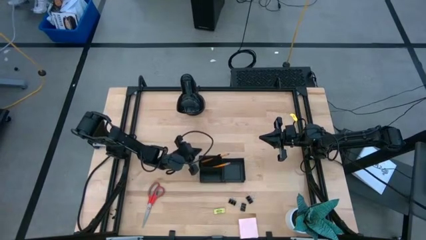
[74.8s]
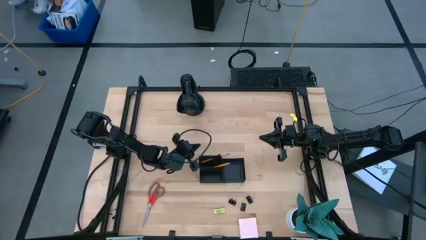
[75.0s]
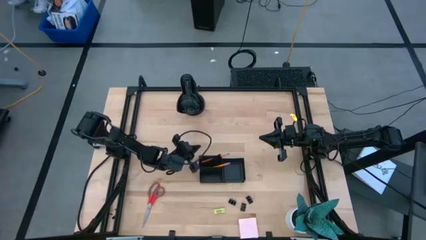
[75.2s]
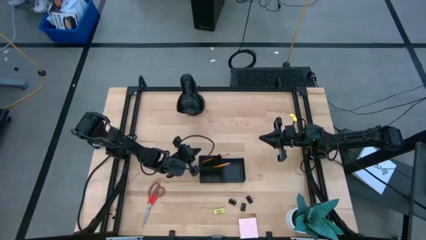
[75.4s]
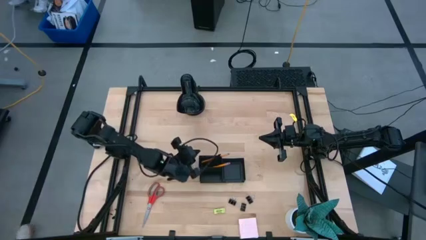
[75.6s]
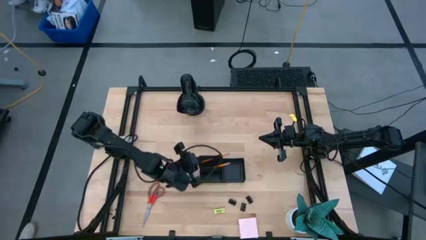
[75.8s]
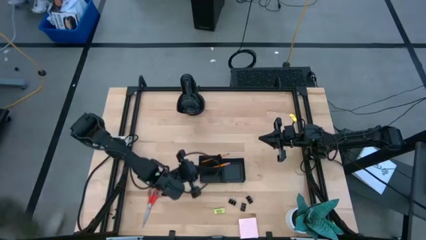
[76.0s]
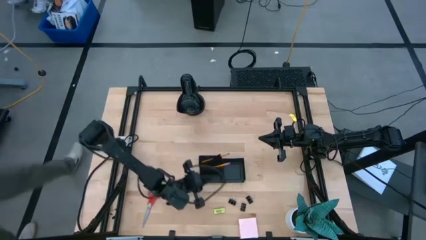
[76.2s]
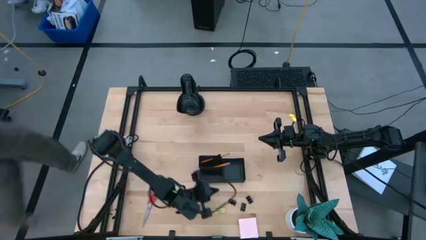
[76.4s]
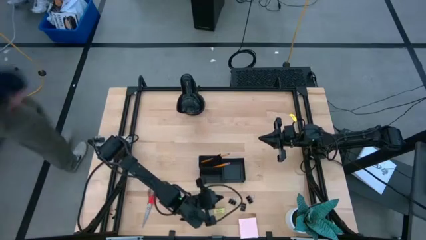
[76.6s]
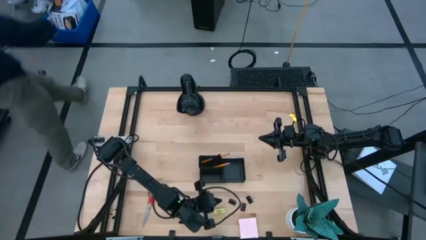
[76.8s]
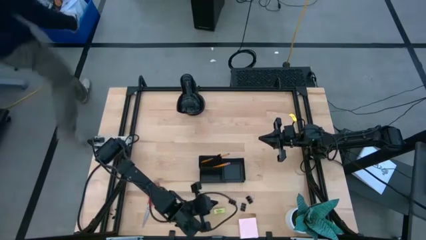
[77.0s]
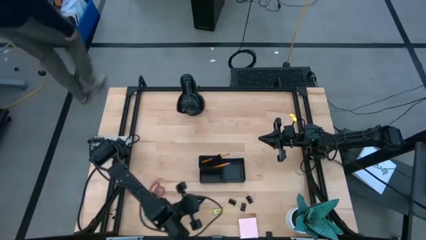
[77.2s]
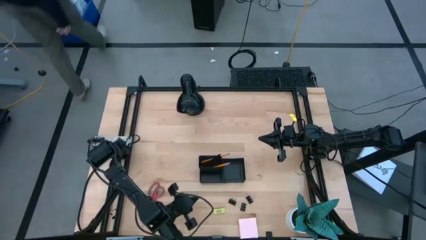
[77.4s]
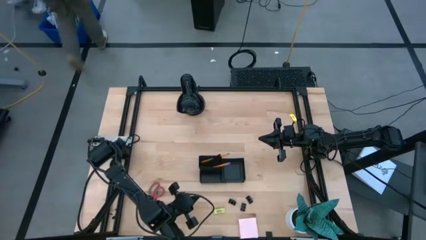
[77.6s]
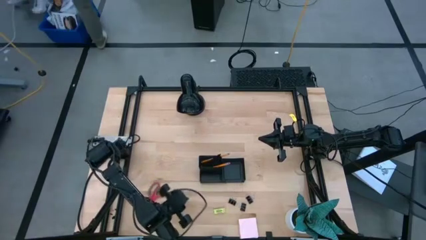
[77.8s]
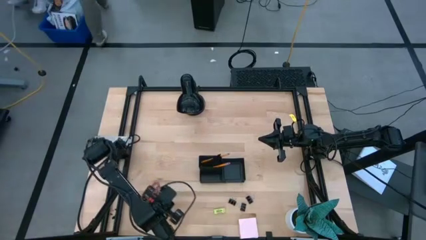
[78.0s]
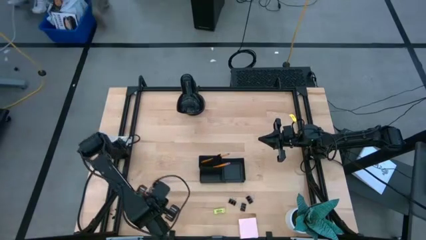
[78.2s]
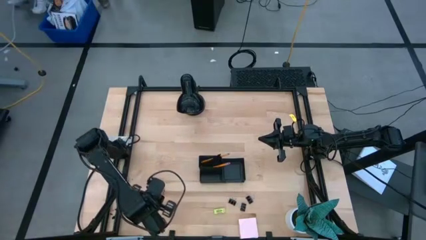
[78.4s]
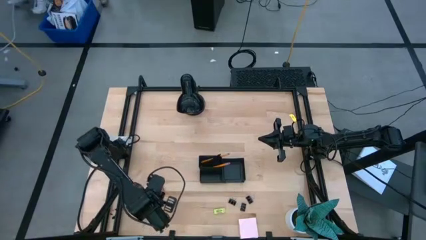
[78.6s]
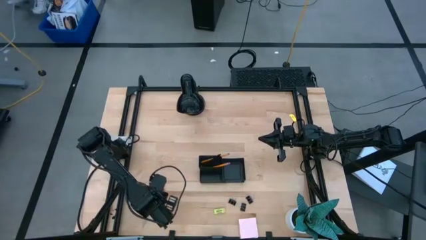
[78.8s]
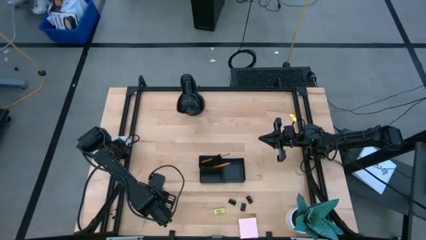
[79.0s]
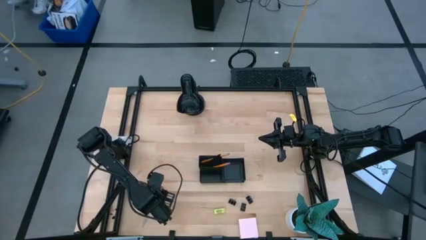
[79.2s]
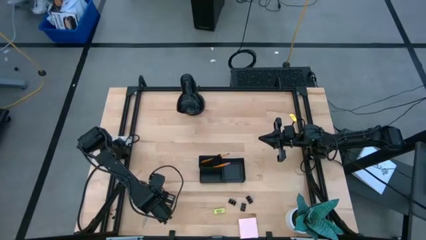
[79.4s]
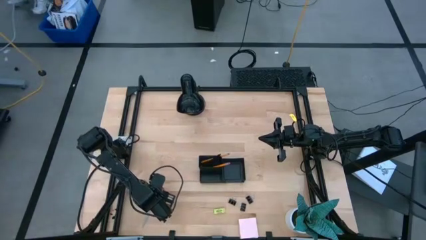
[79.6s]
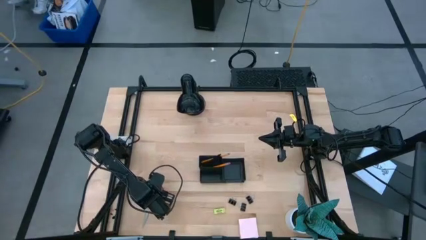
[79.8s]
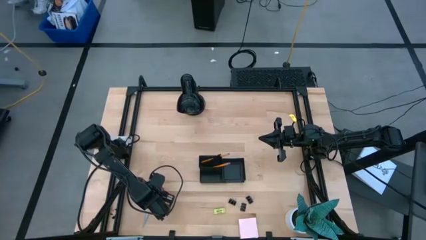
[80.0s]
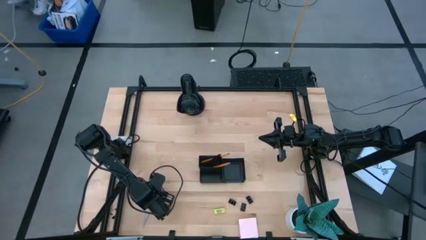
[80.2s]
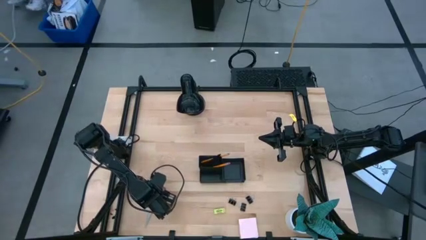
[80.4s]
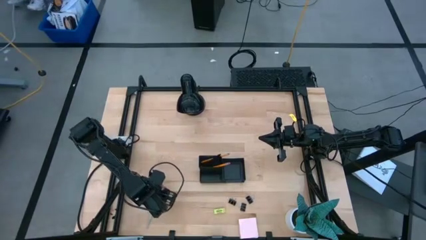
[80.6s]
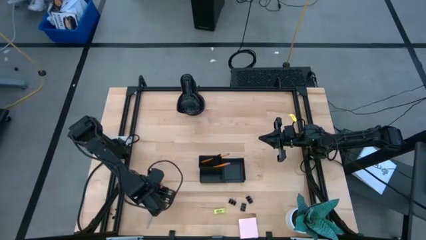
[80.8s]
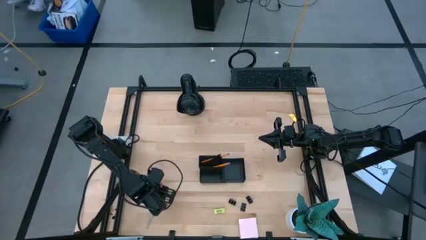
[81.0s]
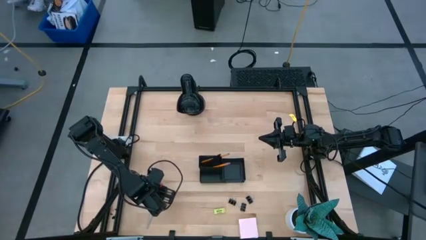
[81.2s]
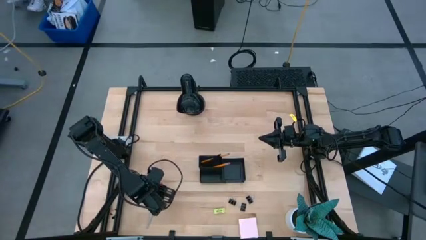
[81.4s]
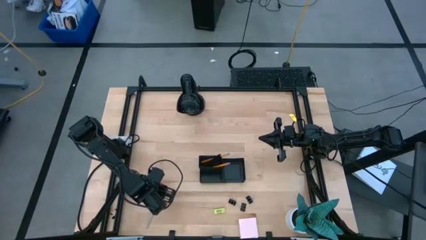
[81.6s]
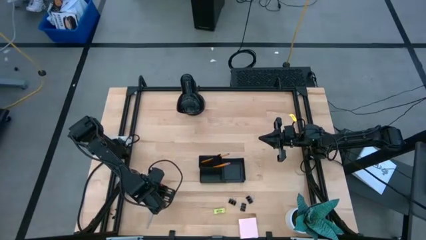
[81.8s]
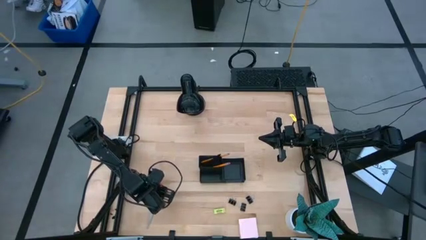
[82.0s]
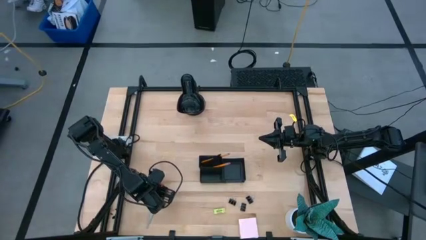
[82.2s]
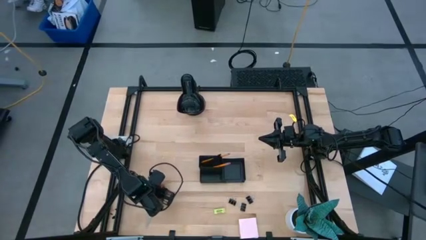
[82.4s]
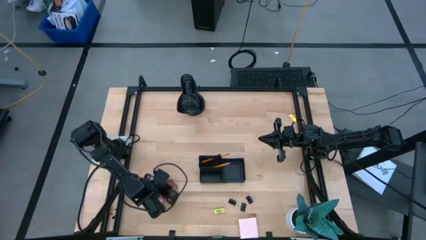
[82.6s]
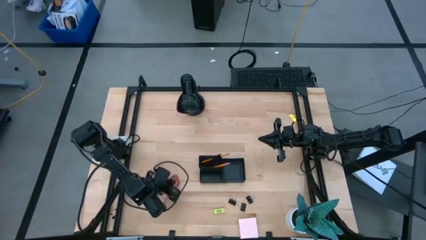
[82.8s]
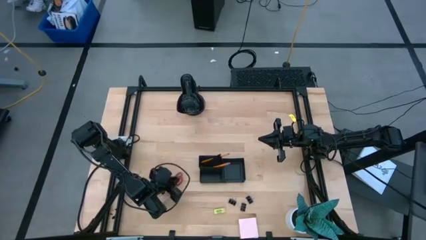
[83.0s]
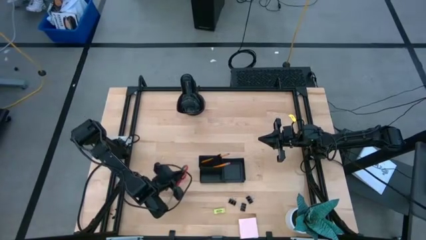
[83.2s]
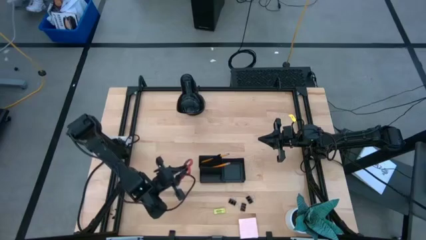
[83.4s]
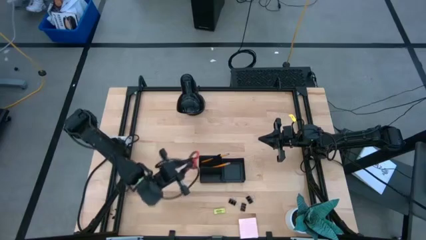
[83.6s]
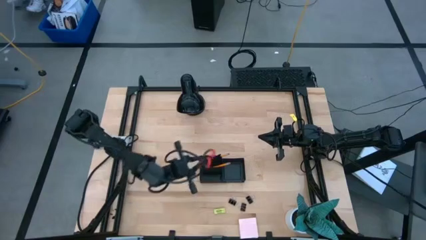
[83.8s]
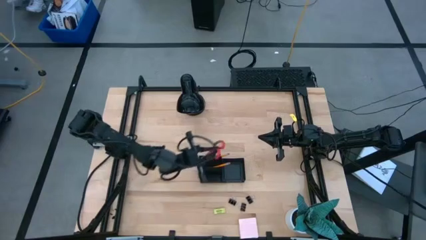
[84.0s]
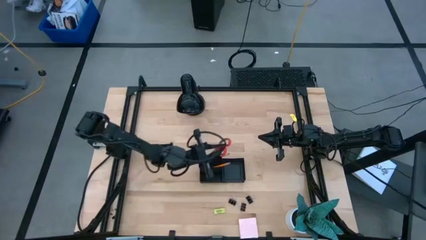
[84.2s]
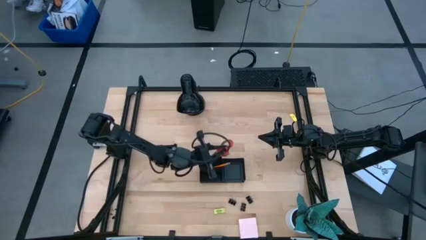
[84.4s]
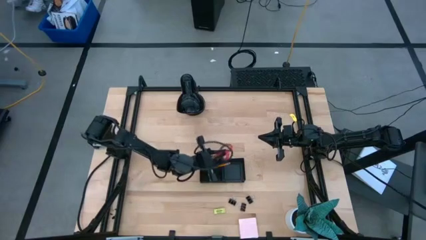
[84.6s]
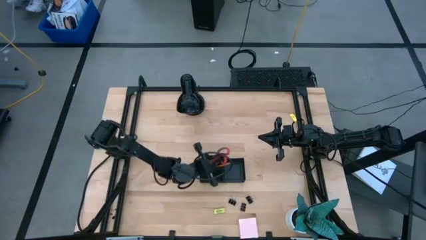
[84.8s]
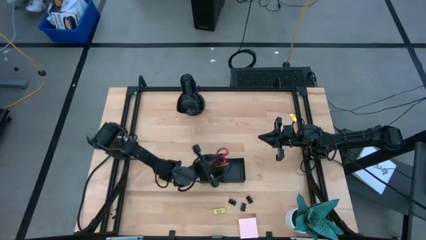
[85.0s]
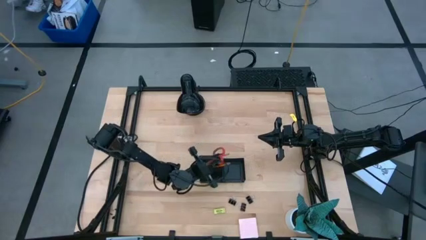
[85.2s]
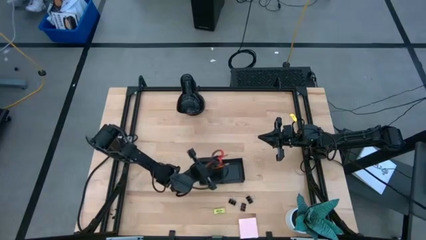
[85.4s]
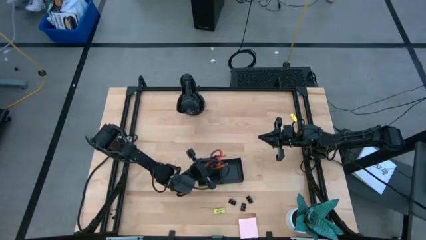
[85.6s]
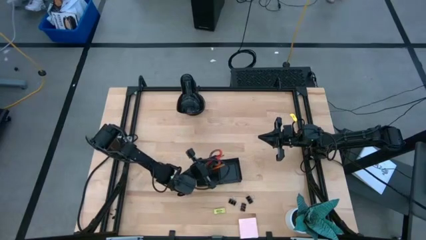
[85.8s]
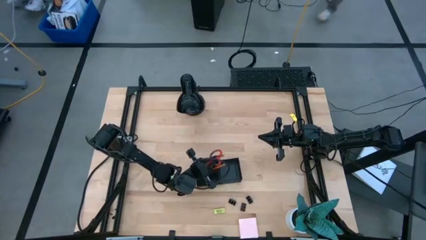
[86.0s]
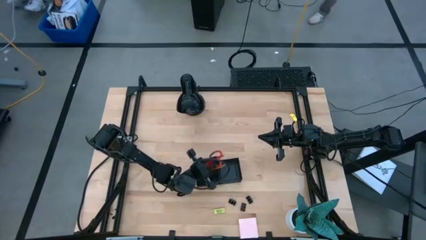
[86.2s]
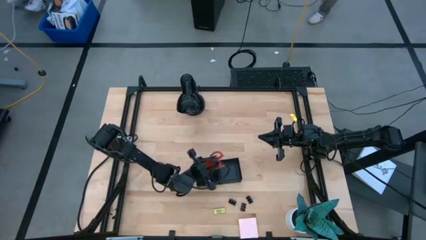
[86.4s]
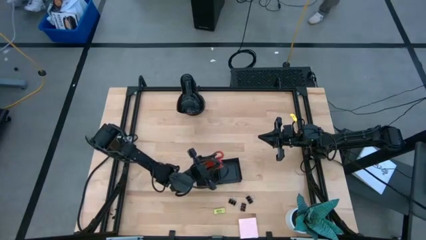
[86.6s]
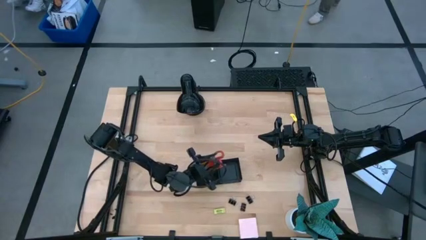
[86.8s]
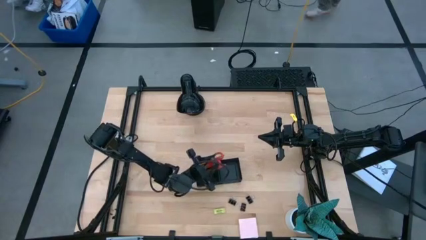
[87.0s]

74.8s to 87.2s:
Task: Pick and place office supplies into organizer
Put the red scissor into the desk organizer

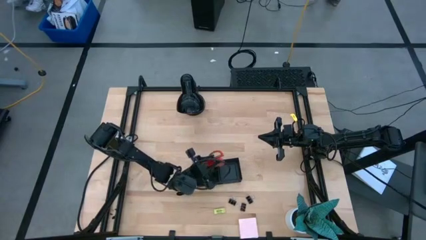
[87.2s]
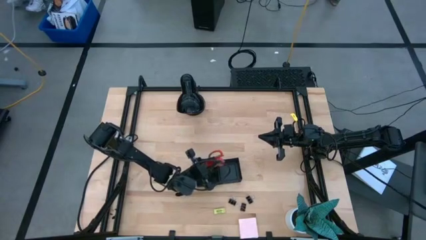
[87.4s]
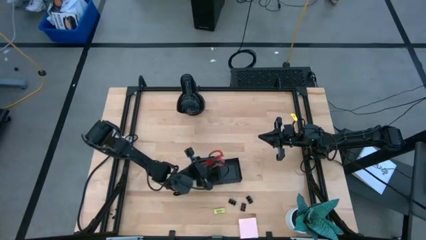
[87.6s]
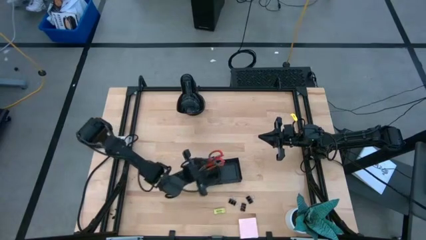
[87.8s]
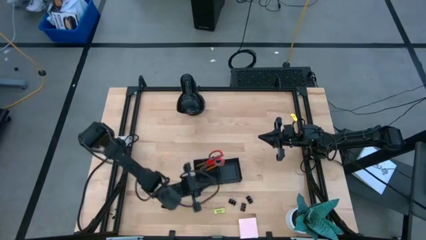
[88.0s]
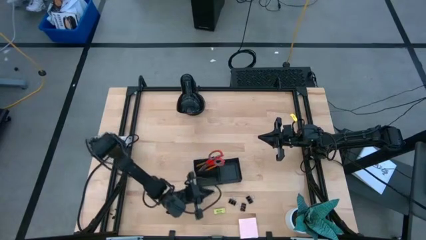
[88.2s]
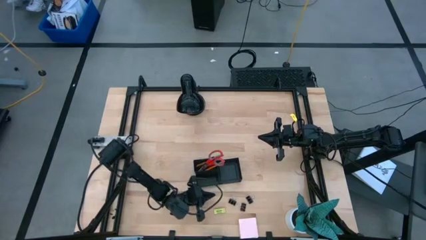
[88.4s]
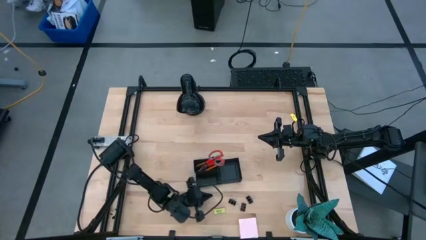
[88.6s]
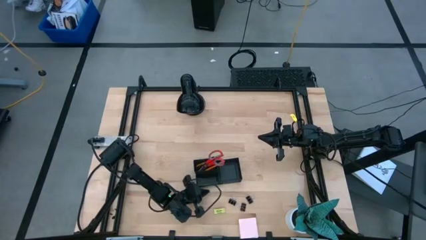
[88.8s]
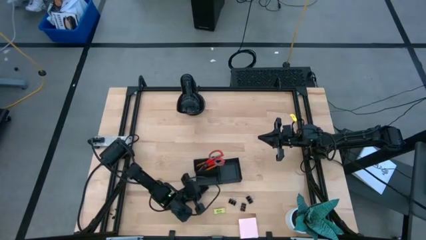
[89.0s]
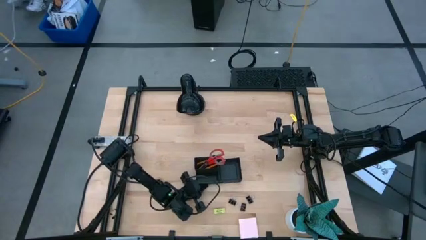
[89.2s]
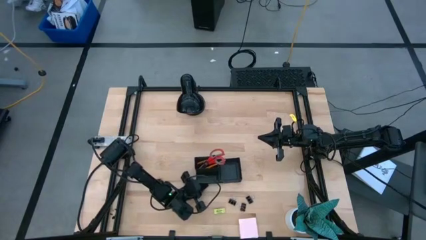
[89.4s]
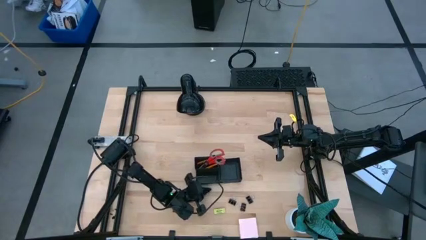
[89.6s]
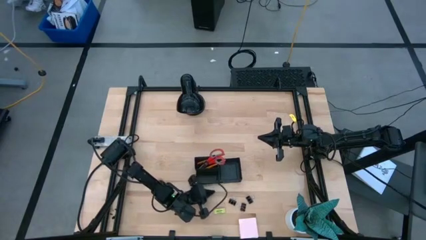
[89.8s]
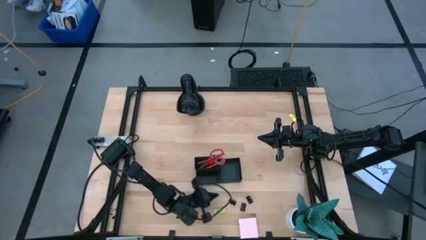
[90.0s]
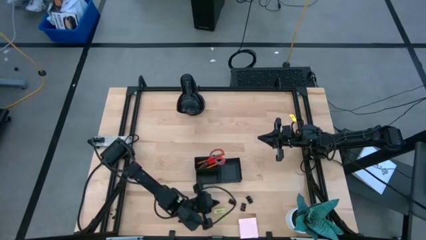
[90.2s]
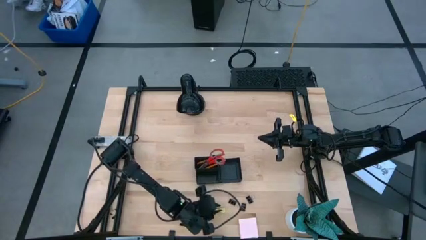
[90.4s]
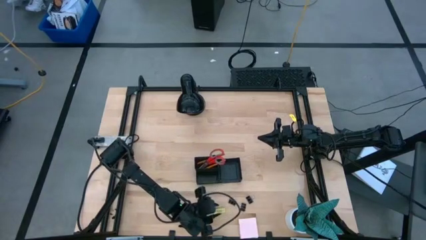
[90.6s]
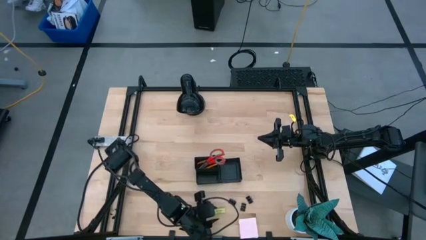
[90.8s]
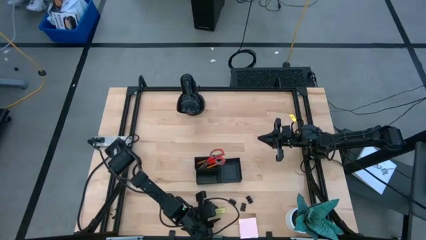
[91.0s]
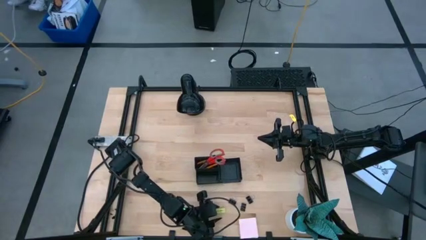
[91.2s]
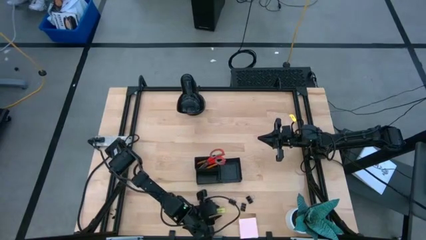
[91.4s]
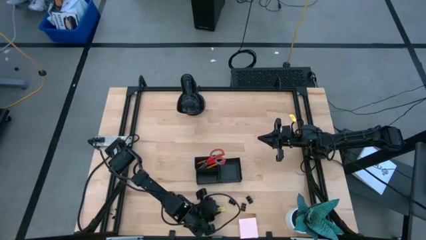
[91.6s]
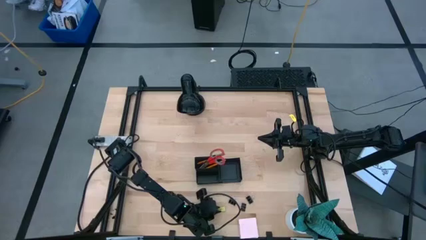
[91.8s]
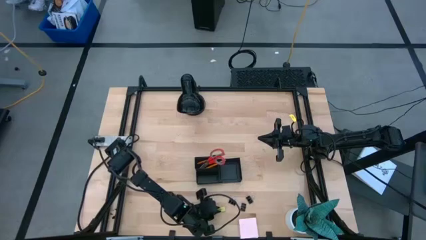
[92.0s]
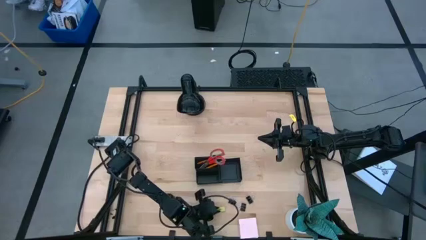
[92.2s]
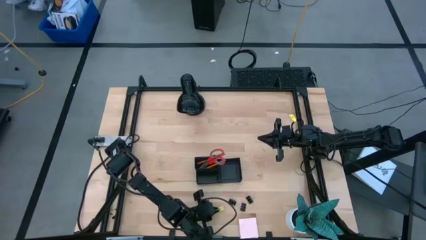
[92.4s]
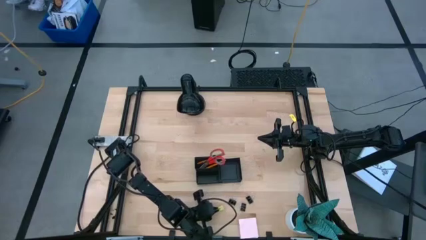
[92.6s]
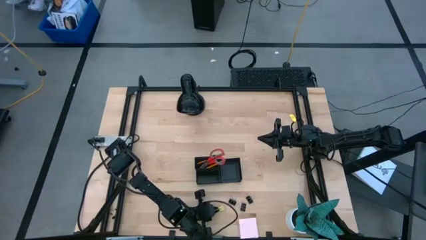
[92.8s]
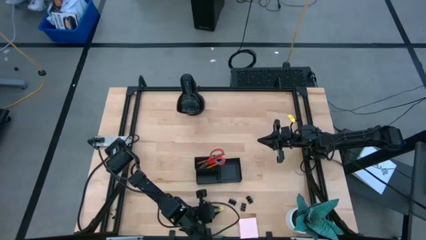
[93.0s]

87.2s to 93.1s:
Put the yellow eraser into the desk organizer
